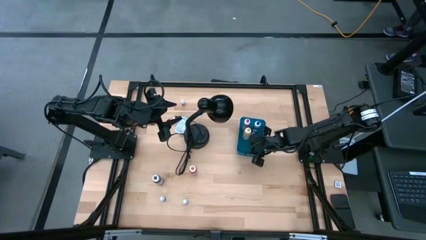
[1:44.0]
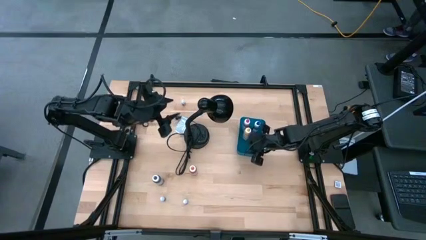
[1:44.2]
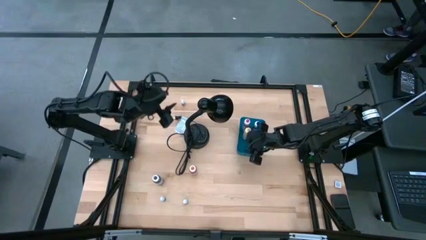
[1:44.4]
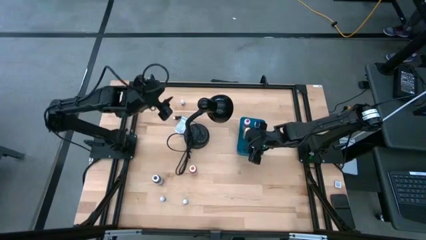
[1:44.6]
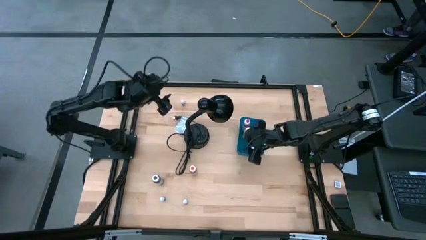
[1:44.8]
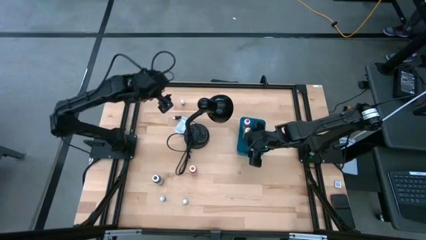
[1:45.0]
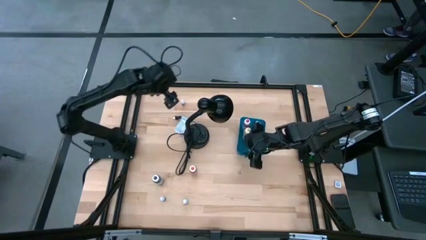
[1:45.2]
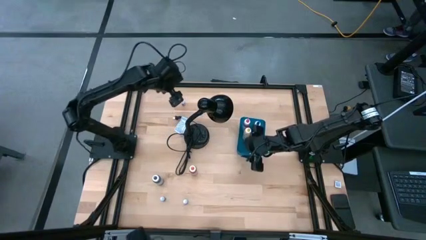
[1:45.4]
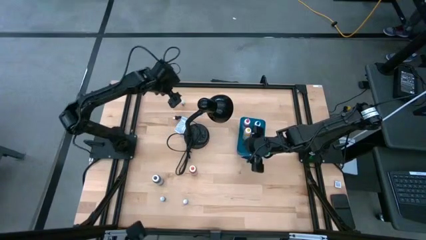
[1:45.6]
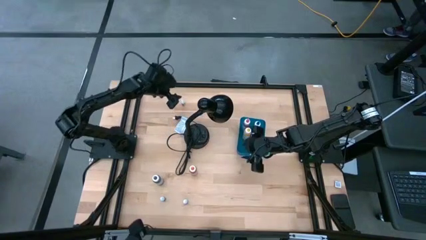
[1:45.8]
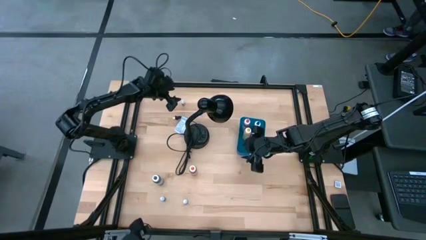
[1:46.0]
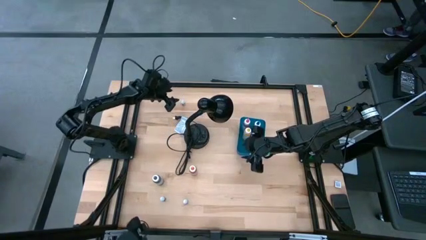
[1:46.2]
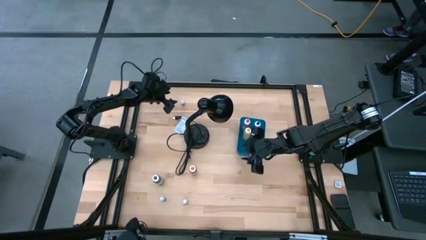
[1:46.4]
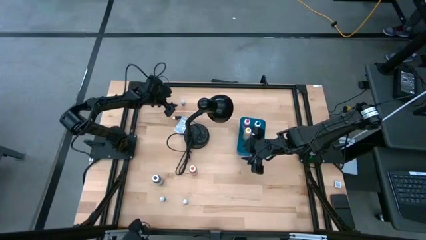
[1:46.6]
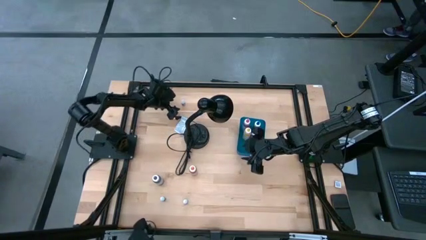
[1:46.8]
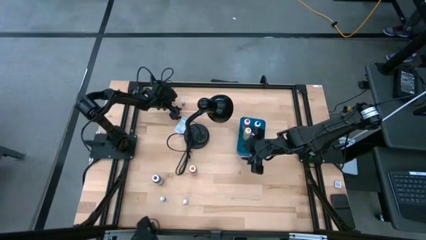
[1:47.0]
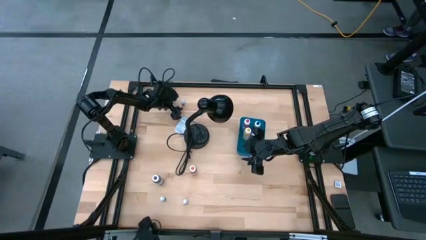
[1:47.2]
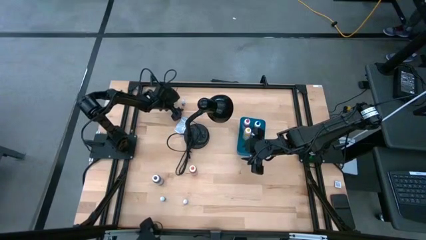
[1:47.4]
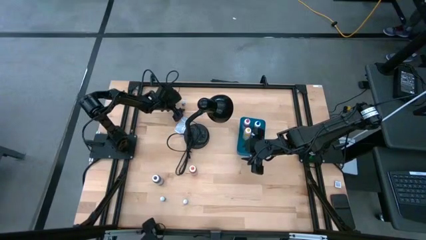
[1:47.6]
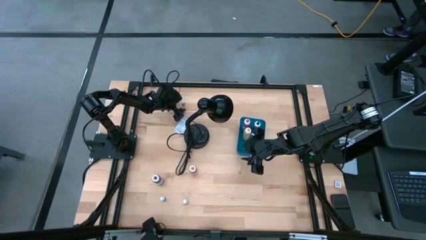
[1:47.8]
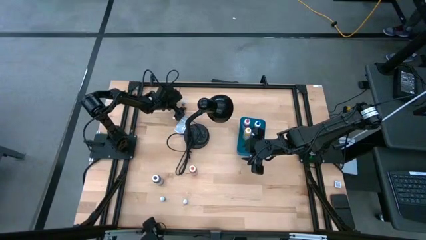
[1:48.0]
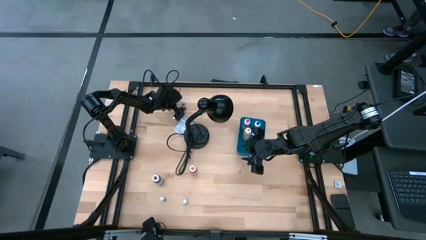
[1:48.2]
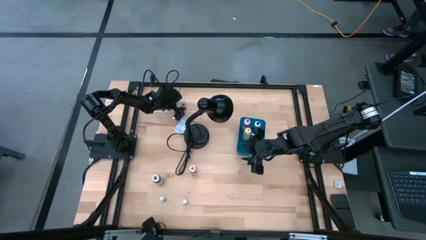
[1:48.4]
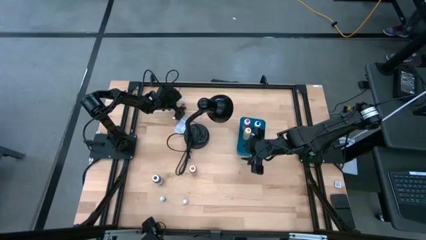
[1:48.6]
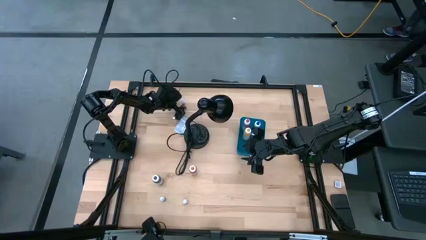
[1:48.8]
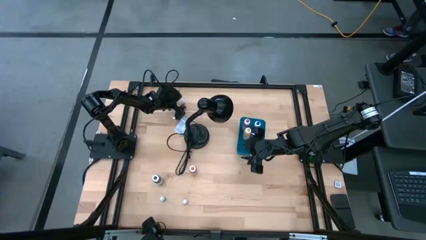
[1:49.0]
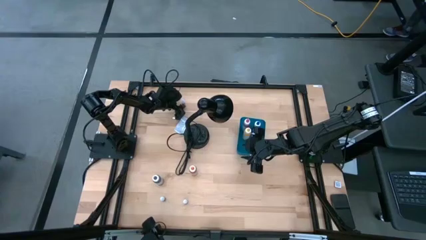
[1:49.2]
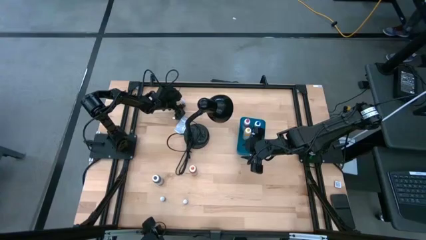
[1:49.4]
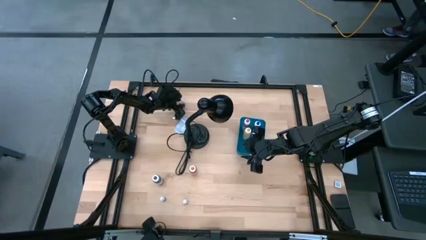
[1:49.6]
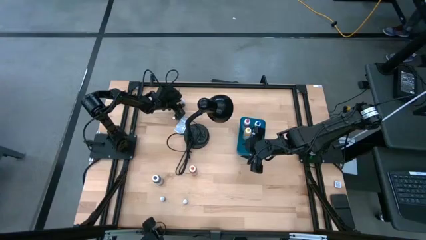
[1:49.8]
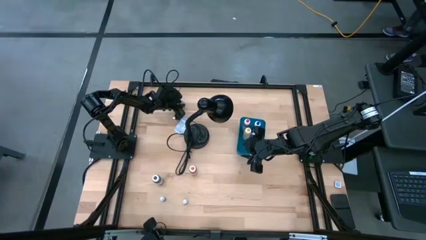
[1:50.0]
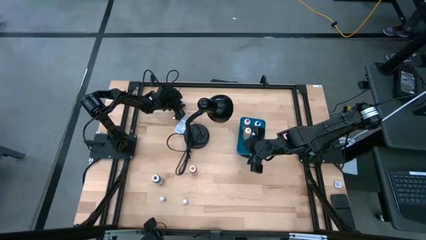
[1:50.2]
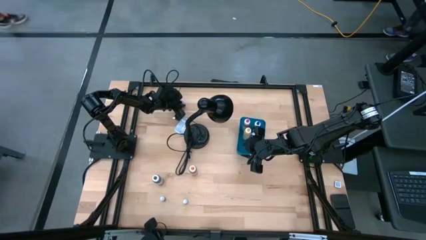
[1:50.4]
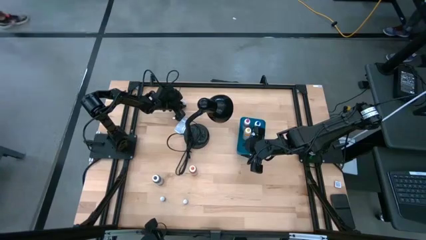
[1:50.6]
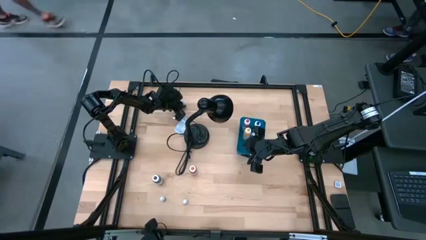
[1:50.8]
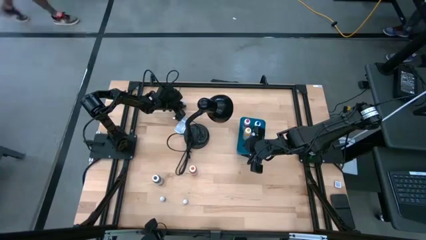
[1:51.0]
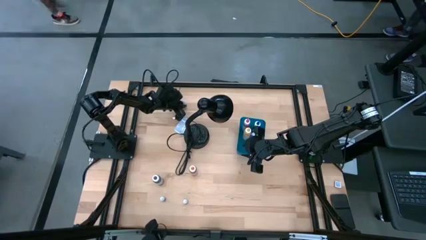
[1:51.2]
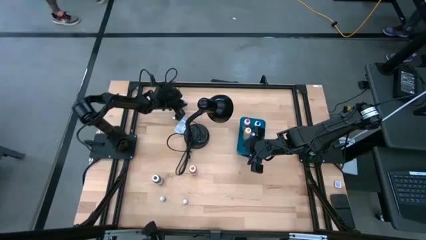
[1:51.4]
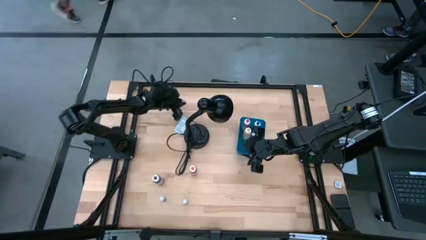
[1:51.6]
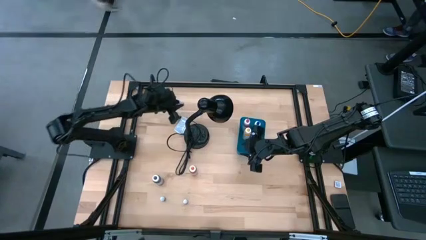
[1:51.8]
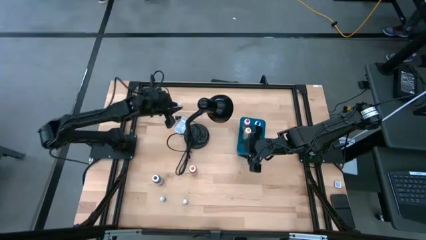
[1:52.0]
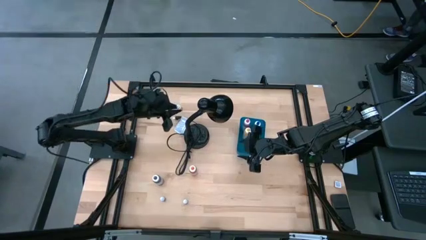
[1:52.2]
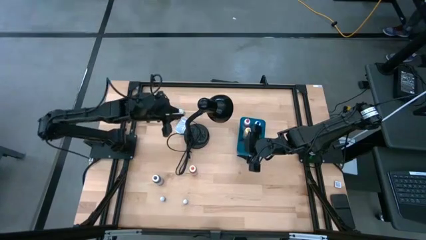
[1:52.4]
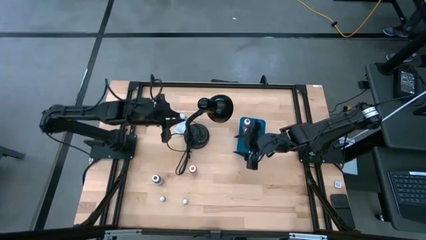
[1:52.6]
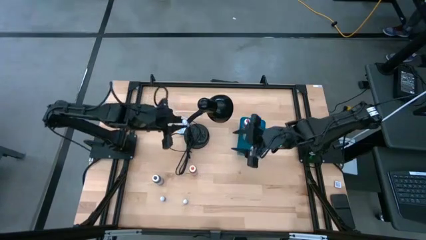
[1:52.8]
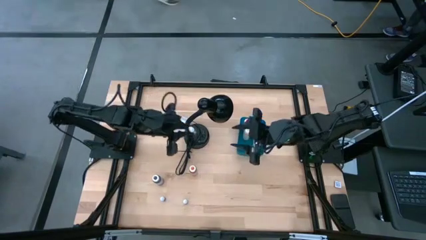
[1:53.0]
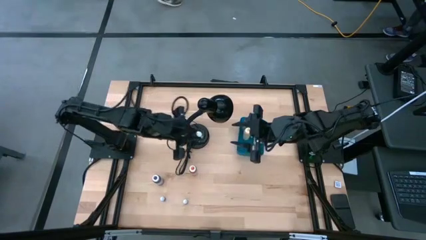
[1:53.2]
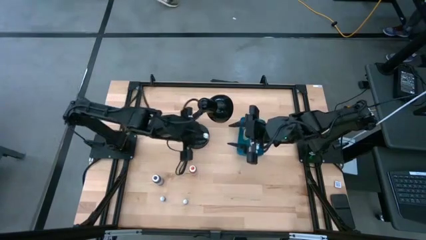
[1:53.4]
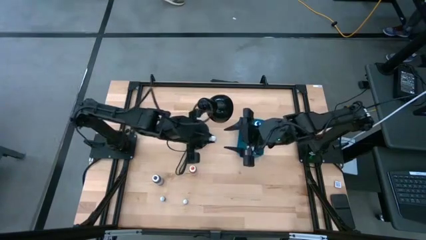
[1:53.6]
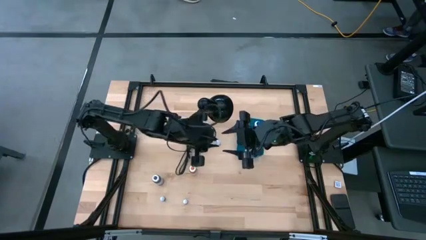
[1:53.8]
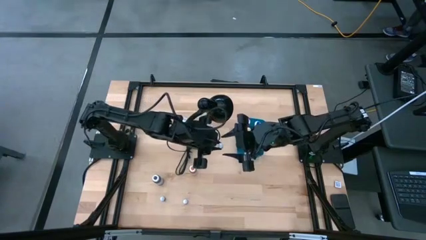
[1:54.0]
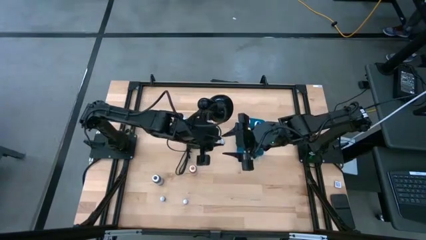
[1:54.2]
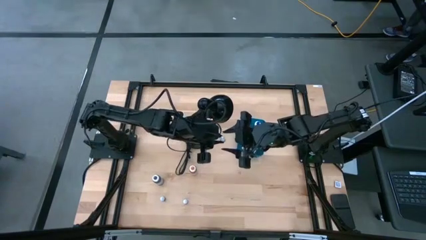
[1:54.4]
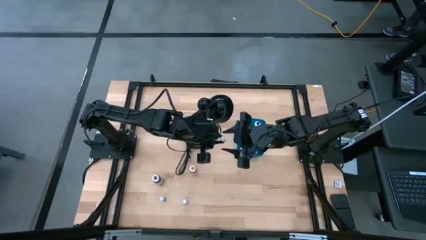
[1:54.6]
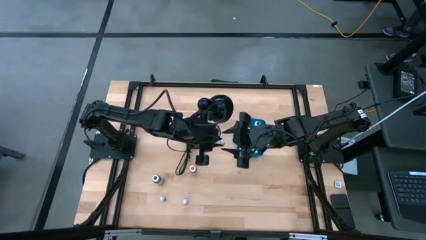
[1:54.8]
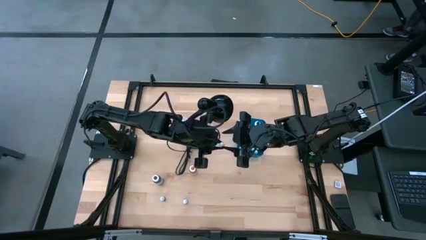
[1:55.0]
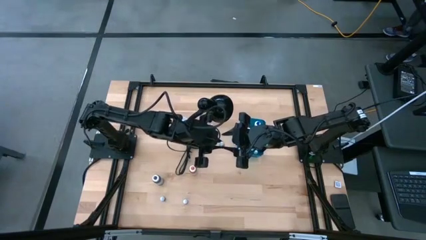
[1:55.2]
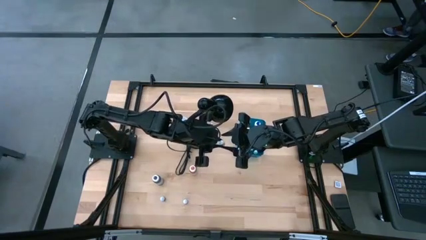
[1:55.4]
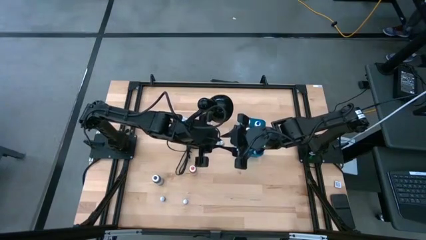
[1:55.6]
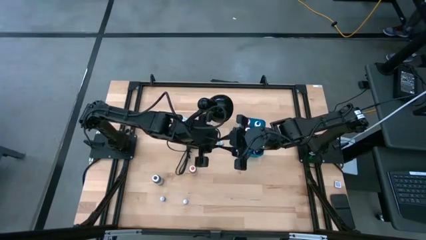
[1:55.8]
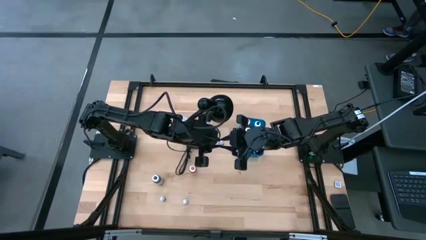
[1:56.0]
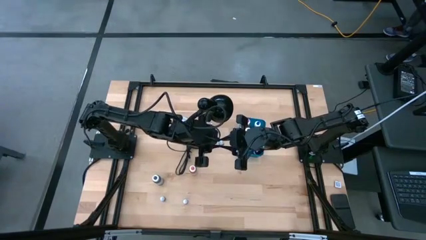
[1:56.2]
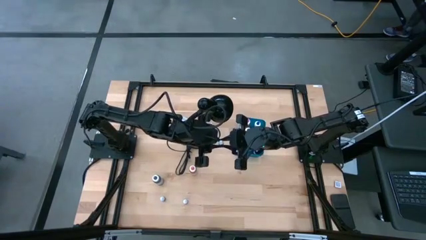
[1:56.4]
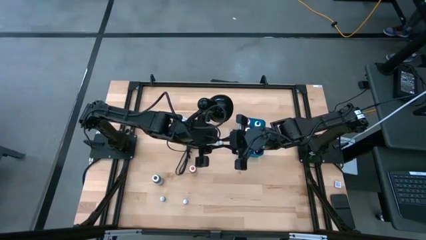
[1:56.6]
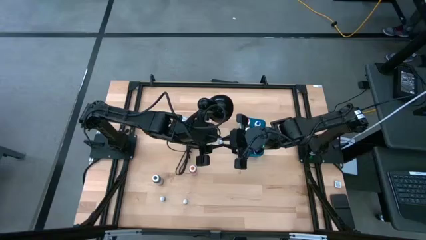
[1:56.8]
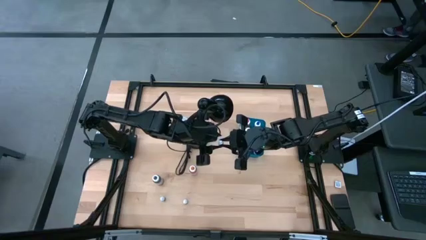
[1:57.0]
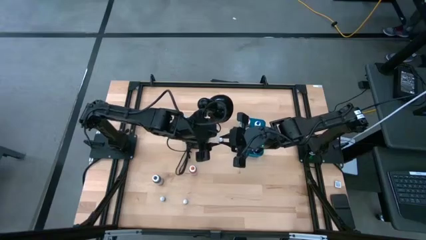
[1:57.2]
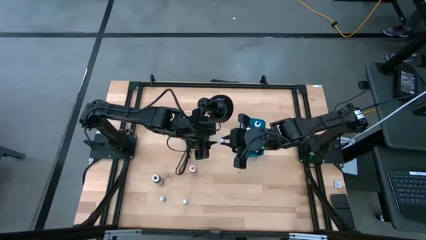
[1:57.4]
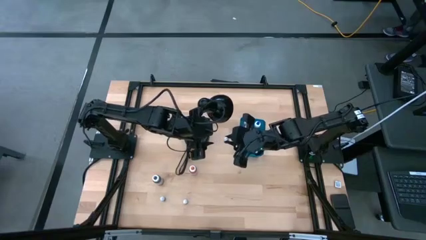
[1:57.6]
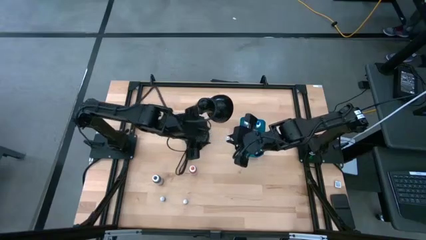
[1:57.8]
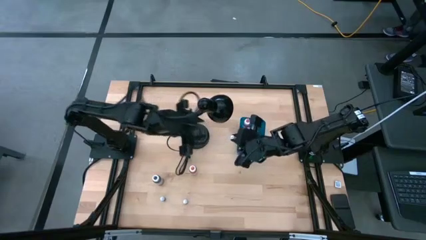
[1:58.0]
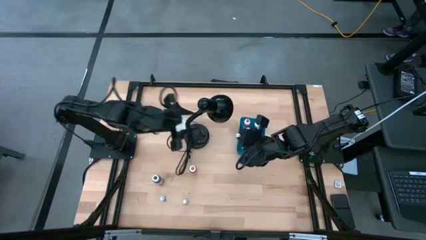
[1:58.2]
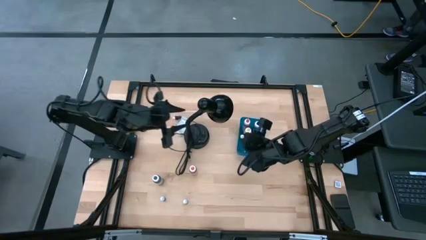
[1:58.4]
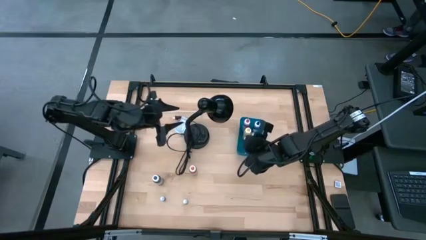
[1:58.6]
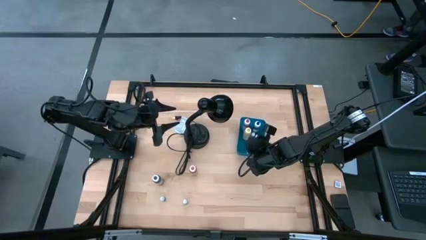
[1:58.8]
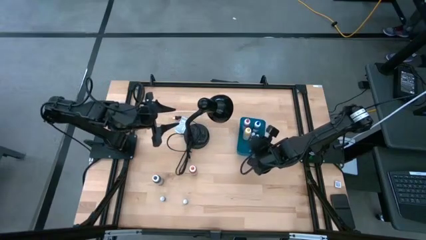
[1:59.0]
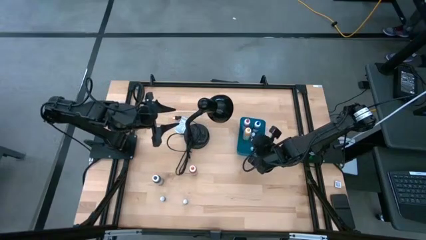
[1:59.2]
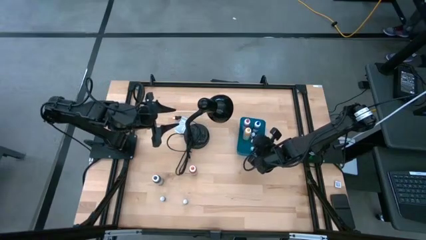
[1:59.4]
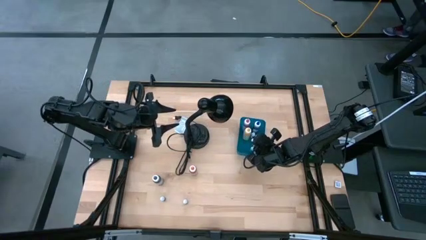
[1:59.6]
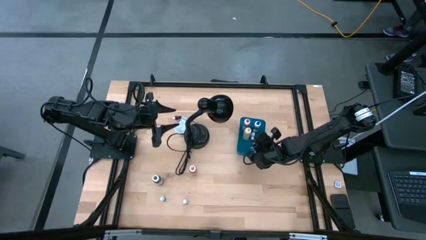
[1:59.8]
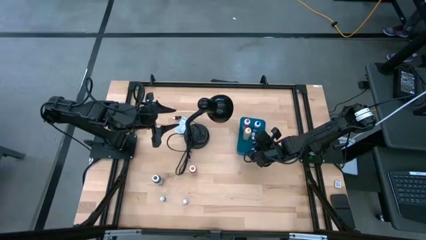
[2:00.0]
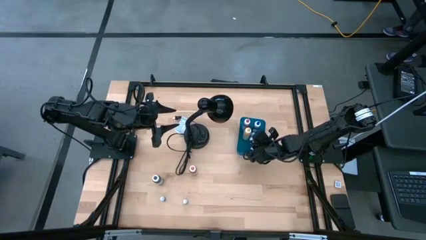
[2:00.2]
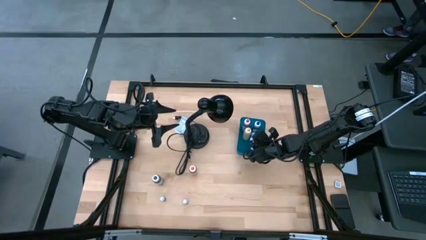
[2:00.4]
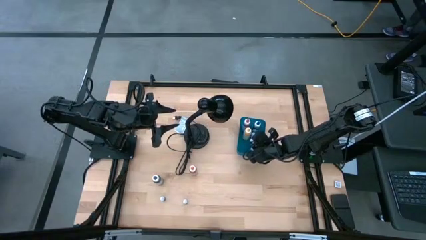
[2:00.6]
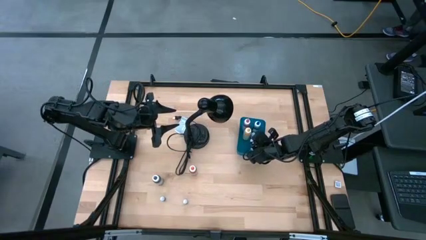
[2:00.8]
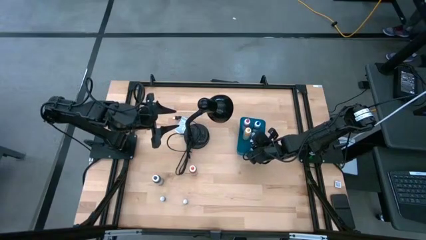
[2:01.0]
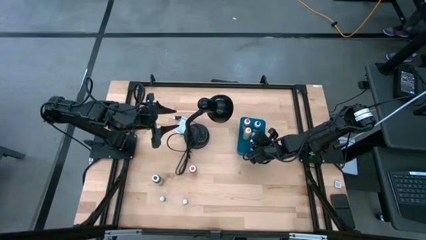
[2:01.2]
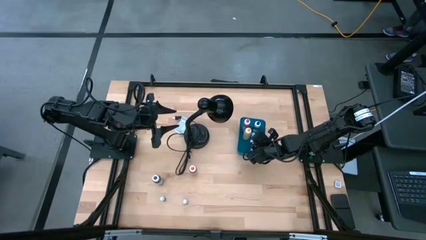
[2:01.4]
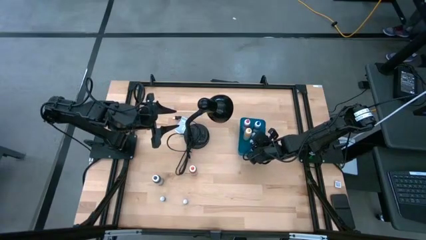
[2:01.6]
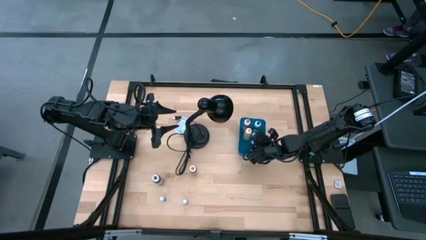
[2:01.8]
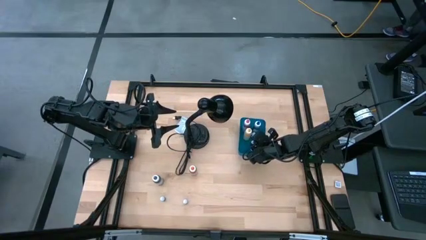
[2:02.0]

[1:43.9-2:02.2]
Task: Pick & Place food coloring
Put the top small pink food coloring bottle into the blue bin
